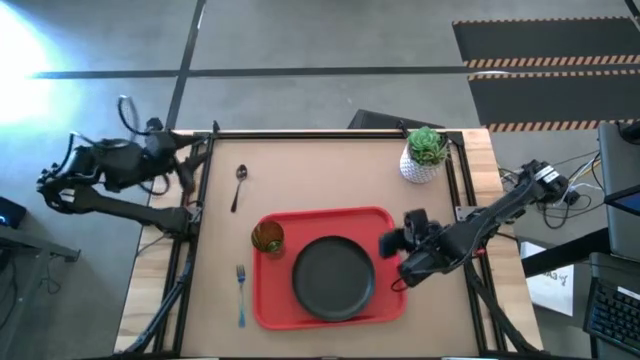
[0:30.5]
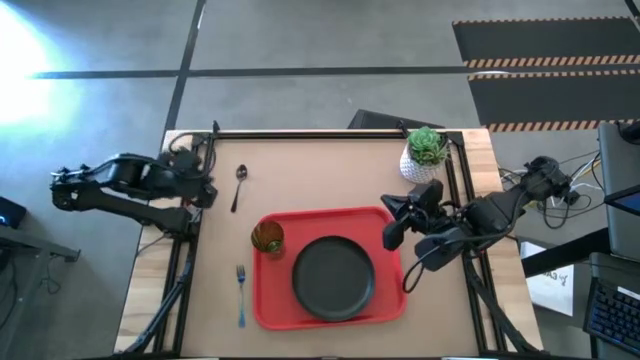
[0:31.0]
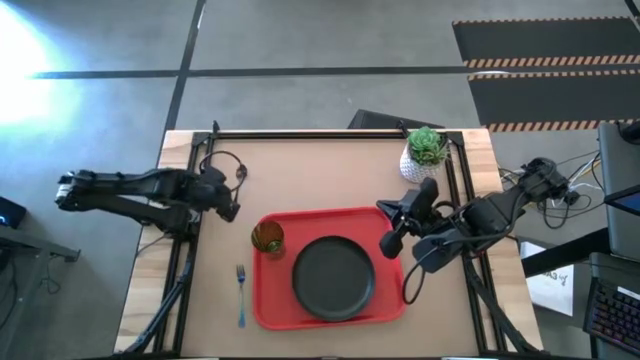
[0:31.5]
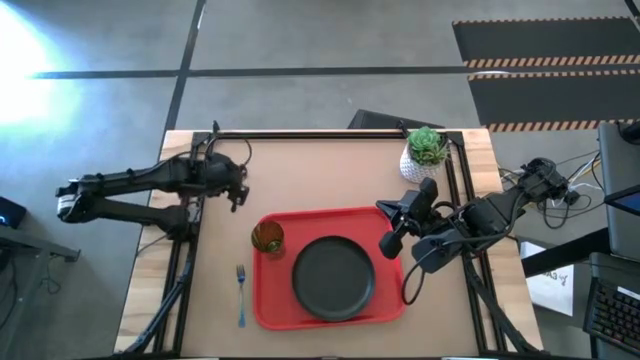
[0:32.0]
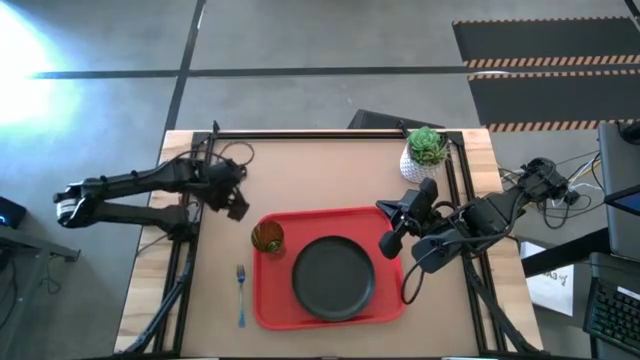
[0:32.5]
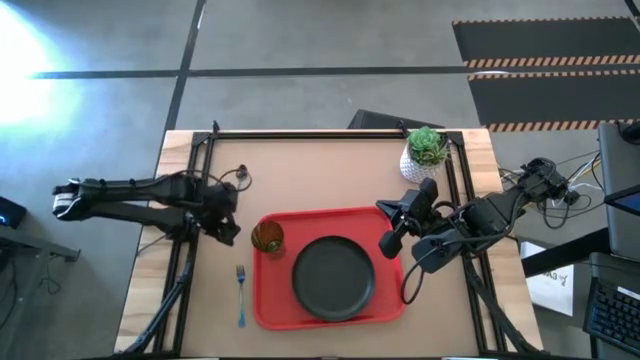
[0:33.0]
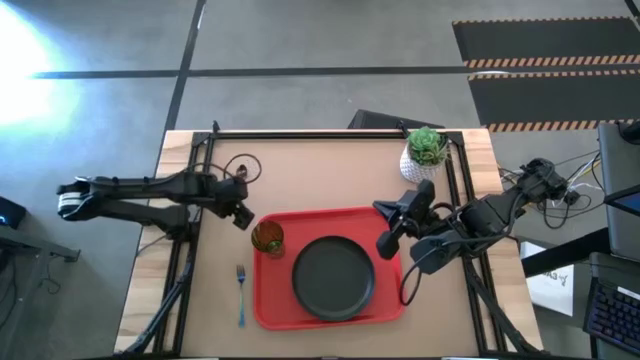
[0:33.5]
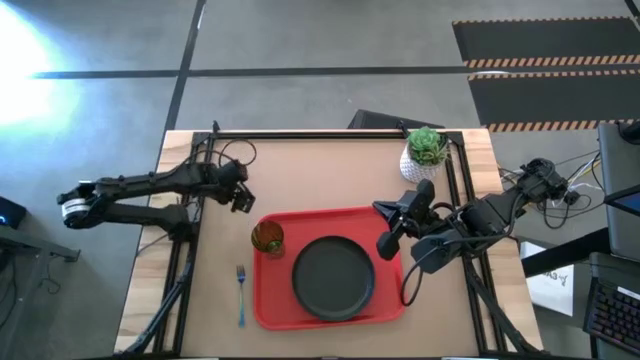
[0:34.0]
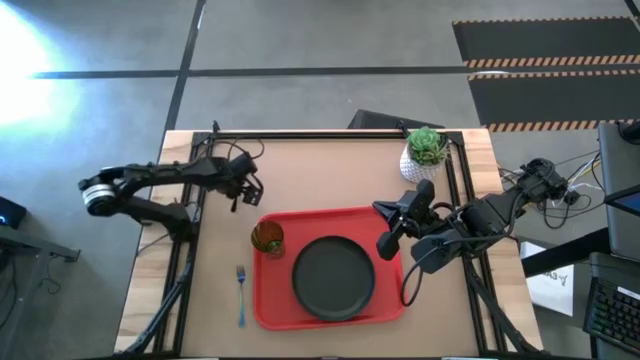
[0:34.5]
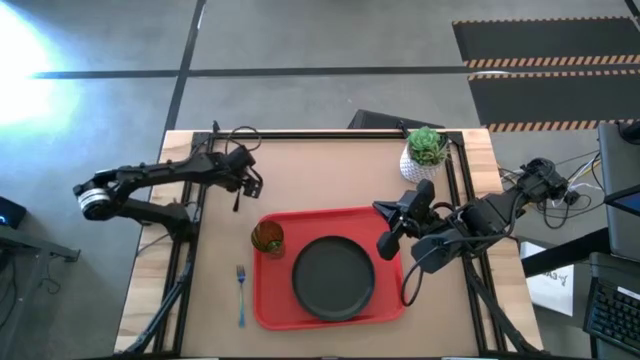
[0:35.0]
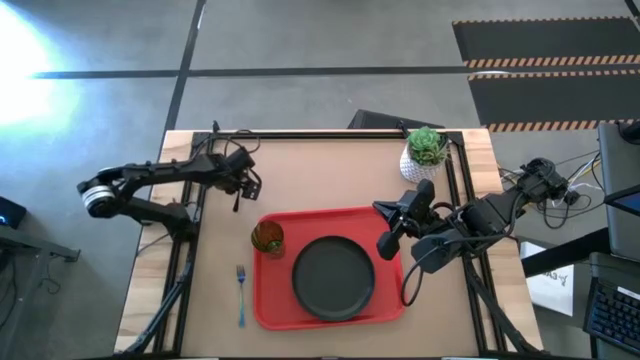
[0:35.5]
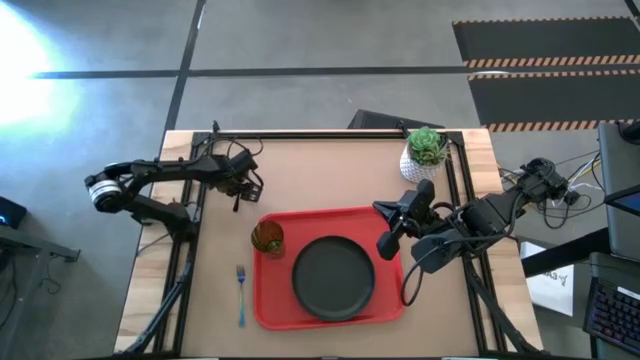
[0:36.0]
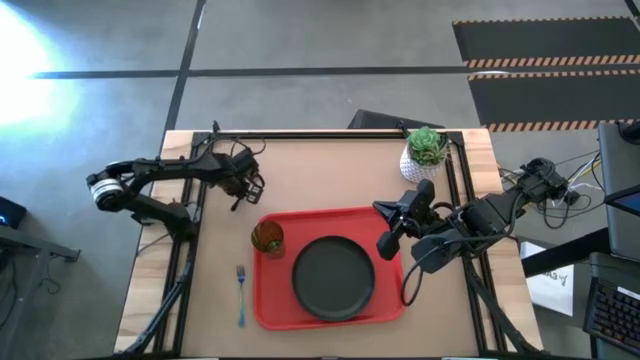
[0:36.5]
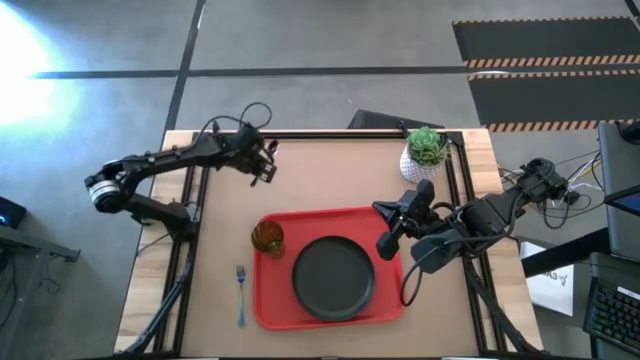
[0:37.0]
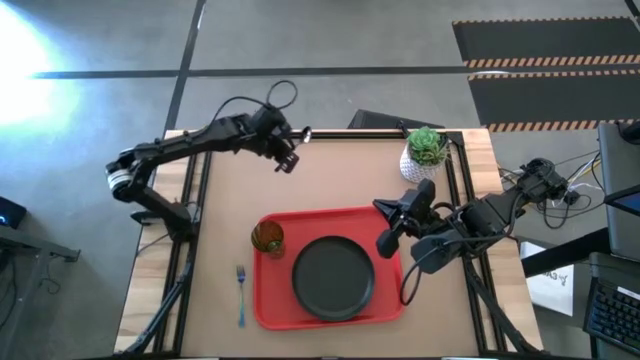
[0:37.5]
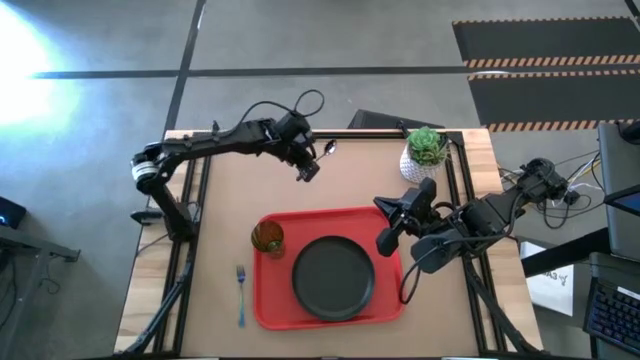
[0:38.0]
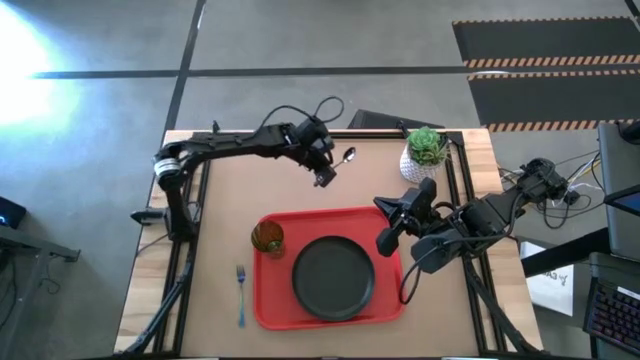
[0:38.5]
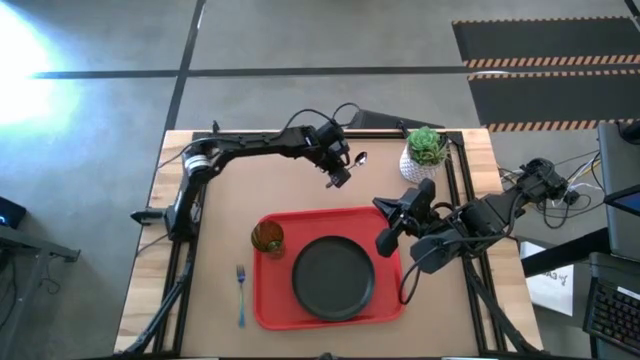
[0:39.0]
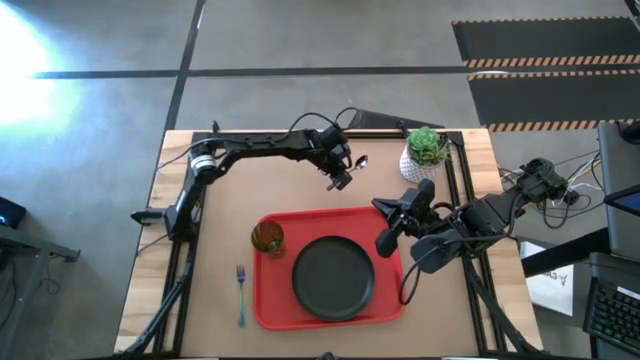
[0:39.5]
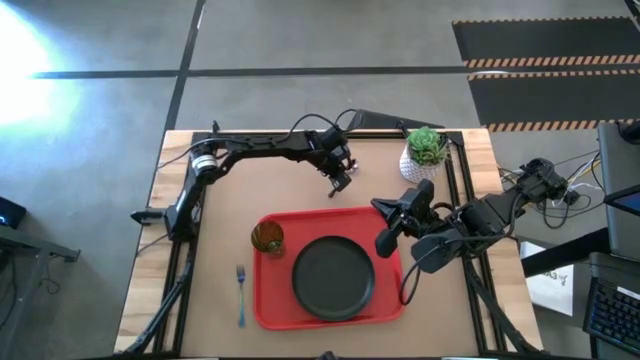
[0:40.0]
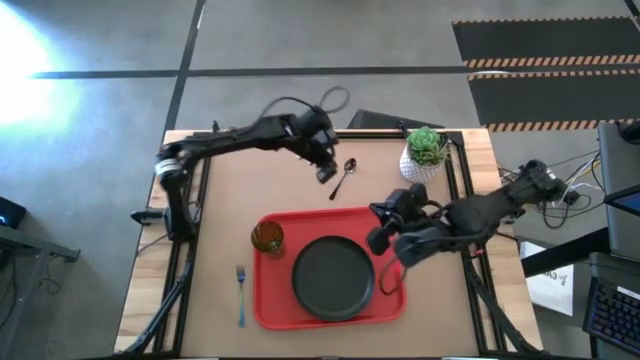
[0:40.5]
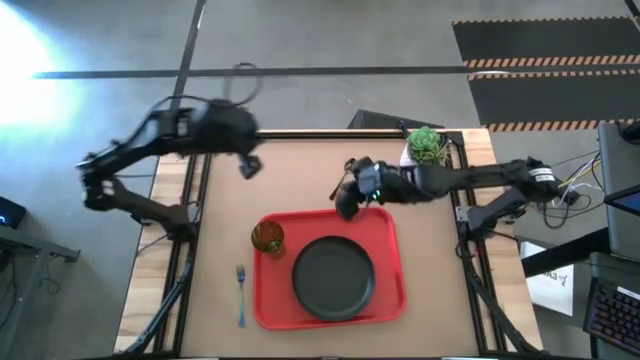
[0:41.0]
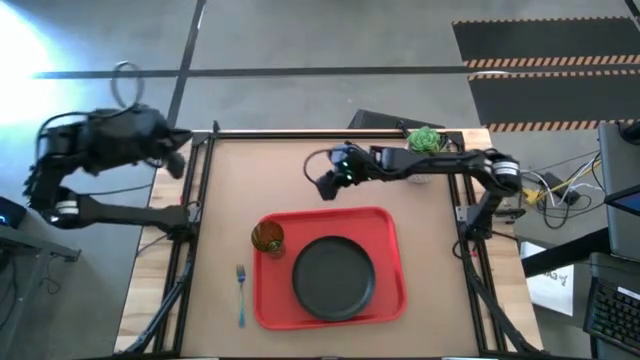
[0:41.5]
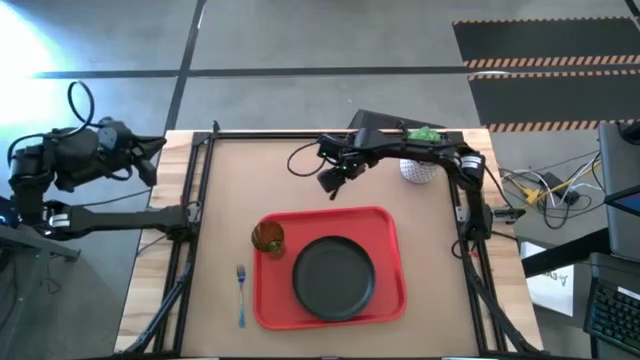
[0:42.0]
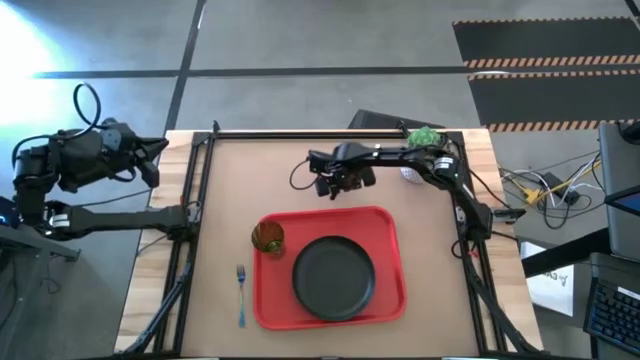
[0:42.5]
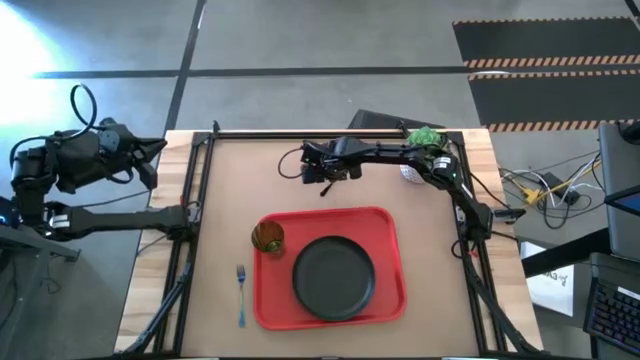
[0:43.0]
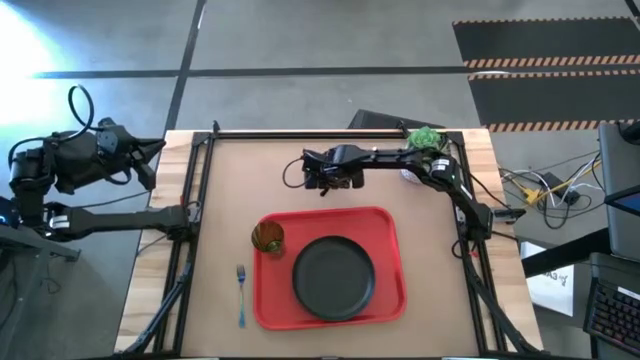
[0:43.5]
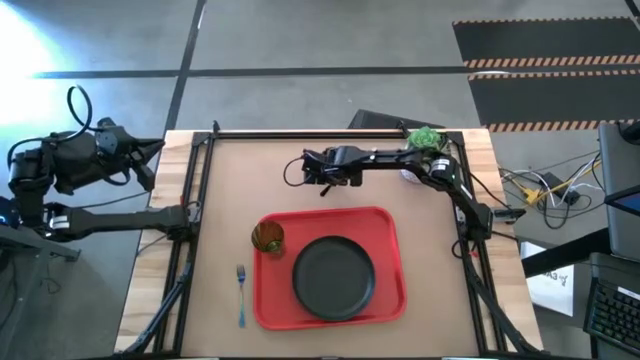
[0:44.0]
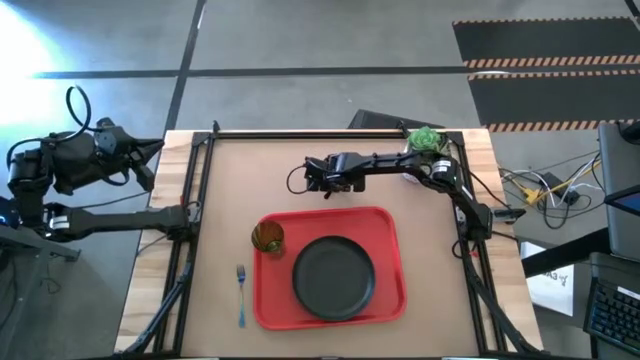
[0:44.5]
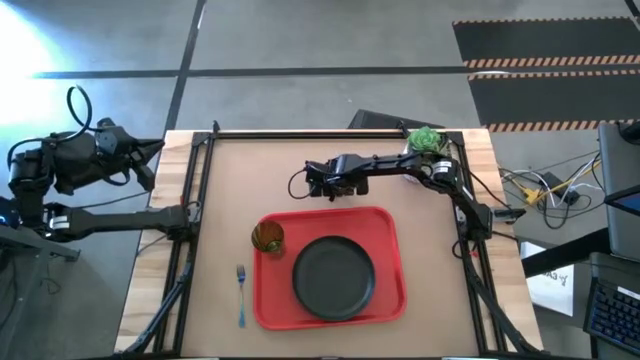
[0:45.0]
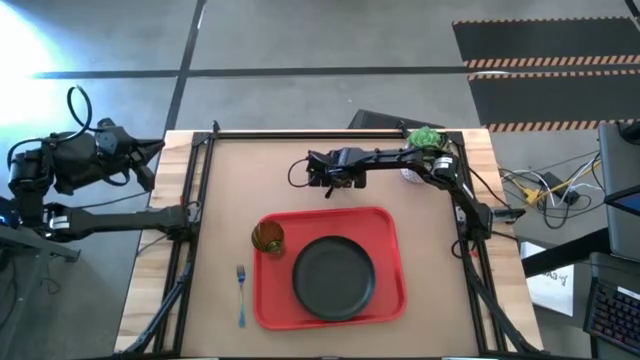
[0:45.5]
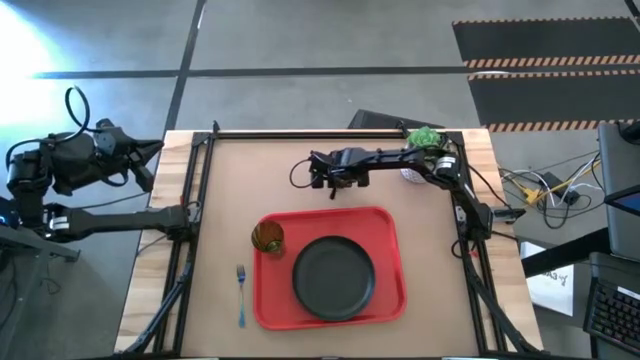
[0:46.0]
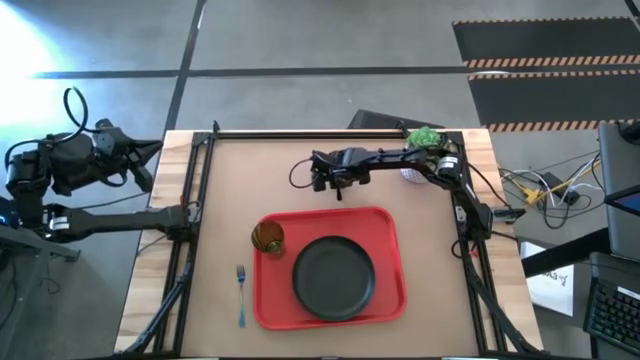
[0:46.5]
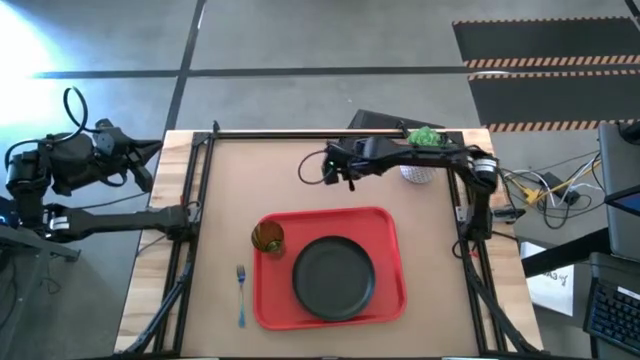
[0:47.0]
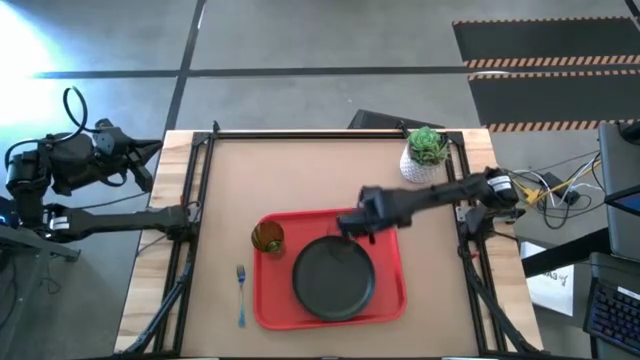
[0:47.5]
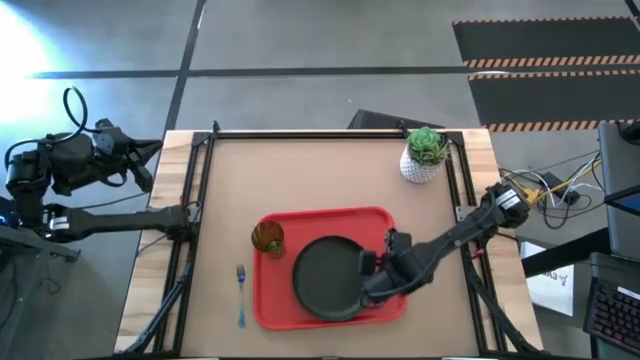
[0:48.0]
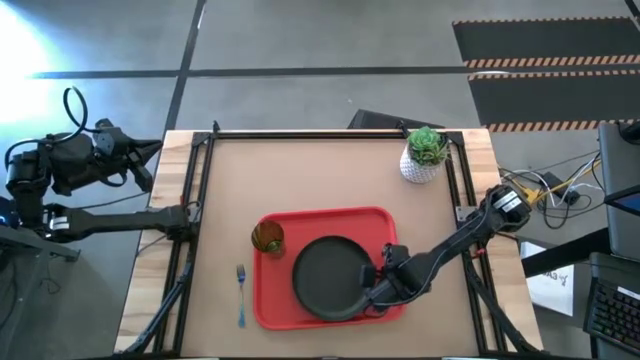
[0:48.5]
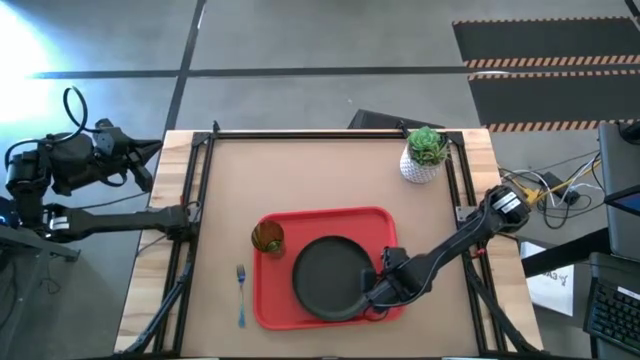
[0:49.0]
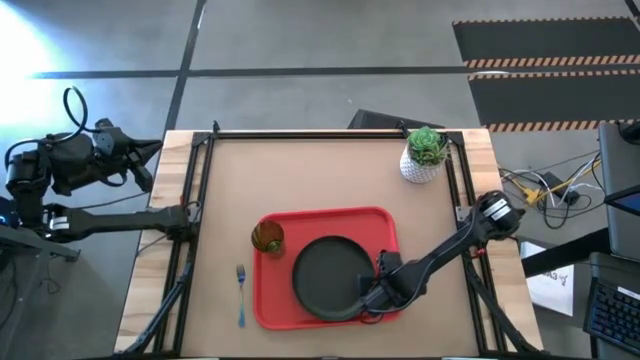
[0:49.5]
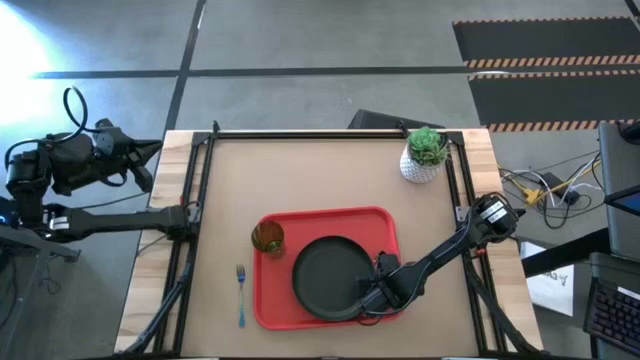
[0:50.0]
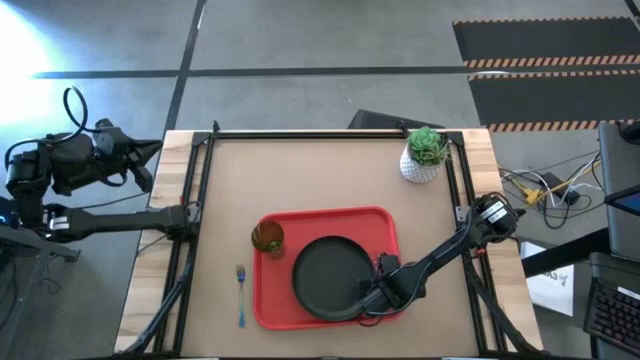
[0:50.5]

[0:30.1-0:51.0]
Task: Pick and place plate/cup/fork/spoon on tray
Put the black spoon to the right side of the black plate on the red serving tray

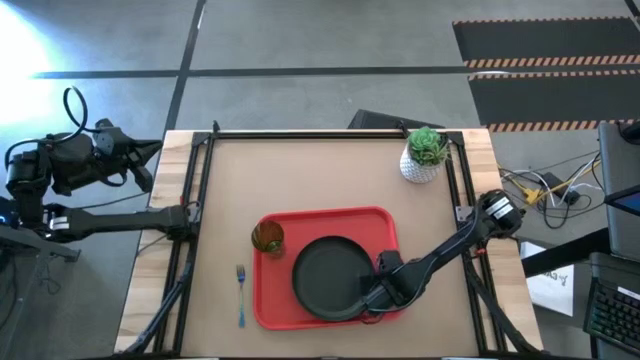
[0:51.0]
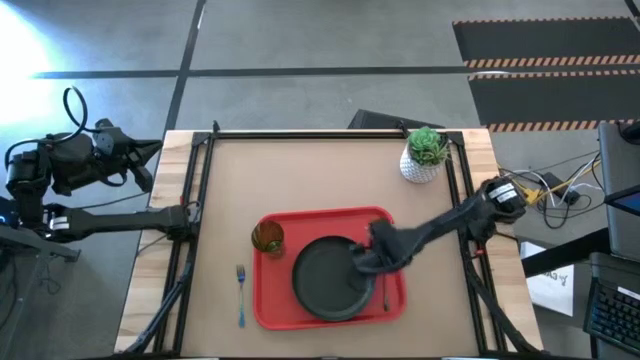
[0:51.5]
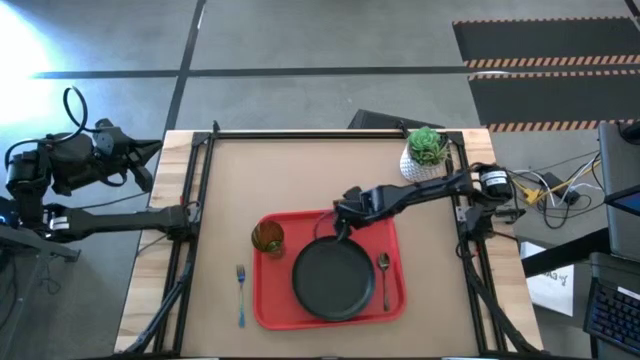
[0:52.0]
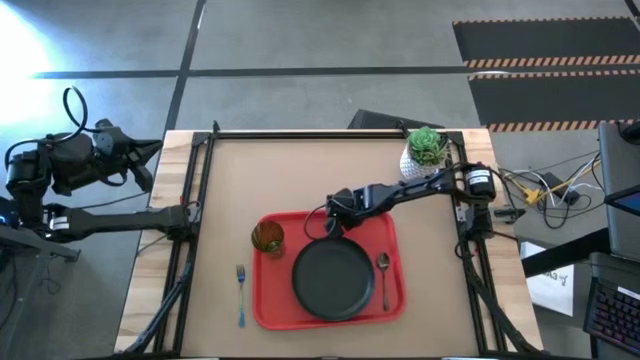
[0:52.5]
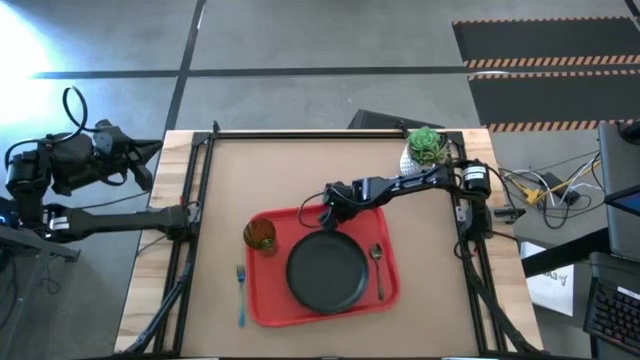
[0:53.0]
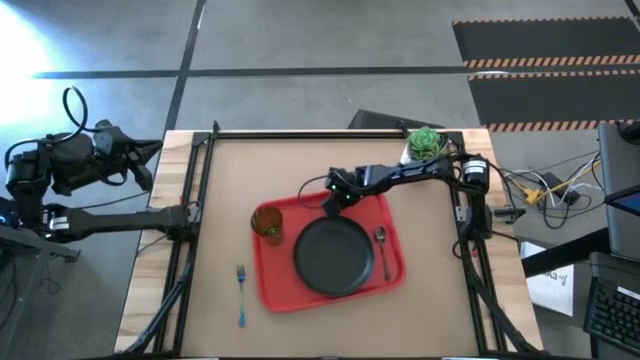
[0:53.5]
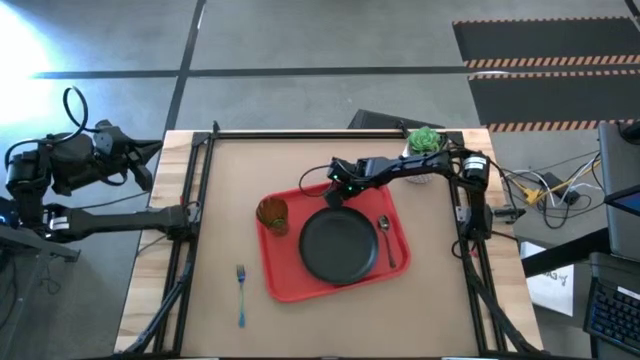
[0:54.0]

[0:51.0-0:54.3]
Adjust the red serving tray
